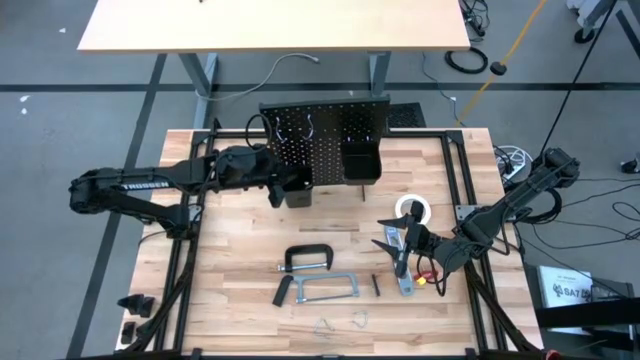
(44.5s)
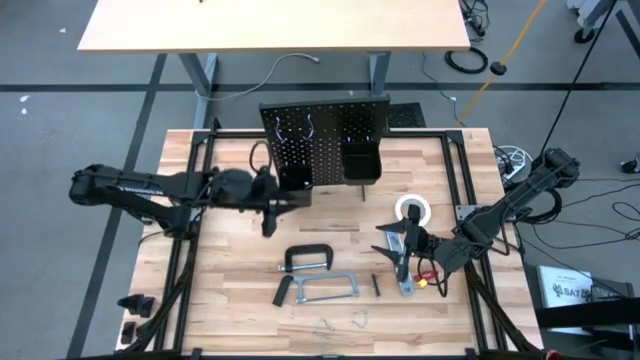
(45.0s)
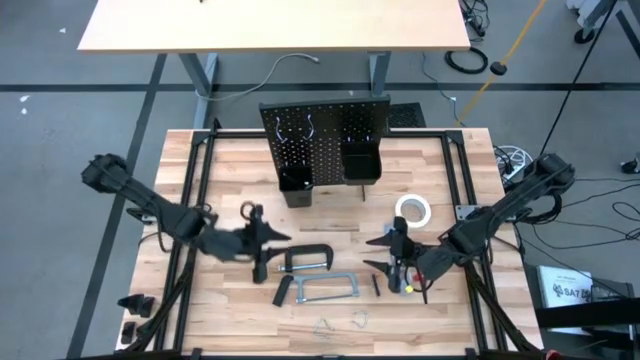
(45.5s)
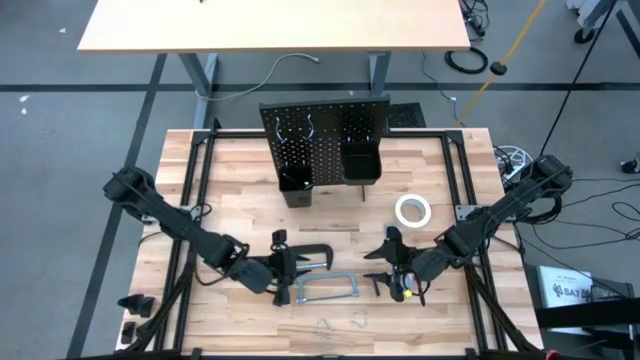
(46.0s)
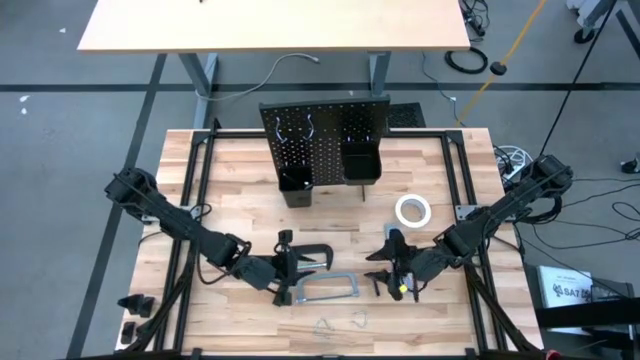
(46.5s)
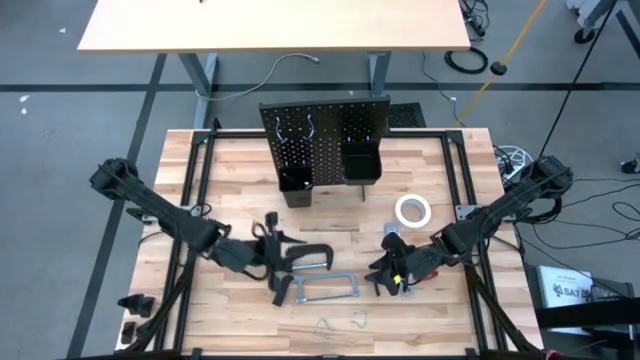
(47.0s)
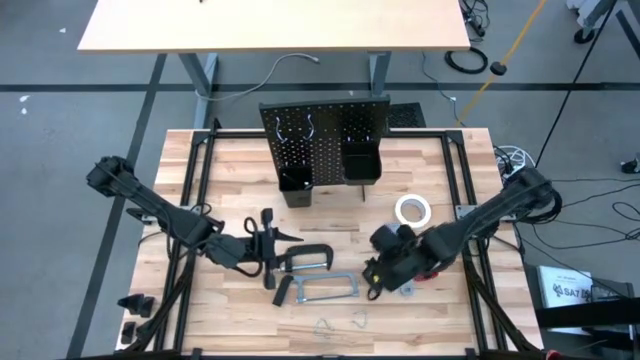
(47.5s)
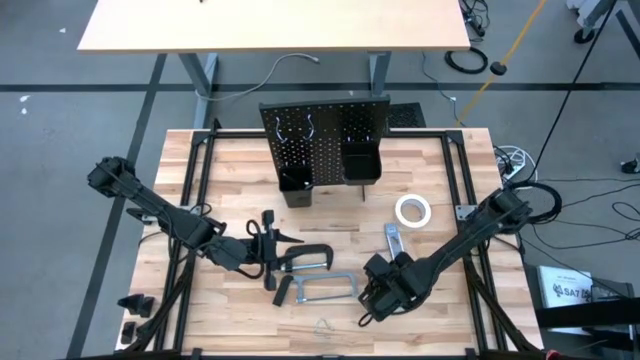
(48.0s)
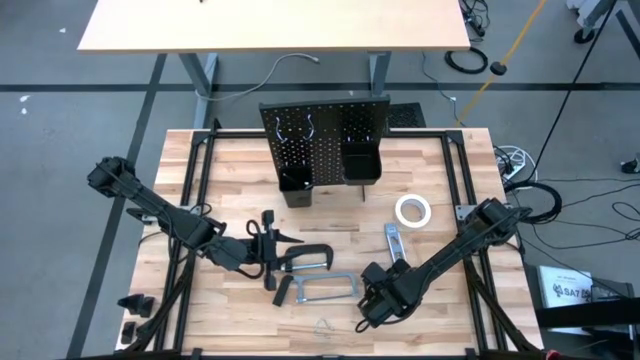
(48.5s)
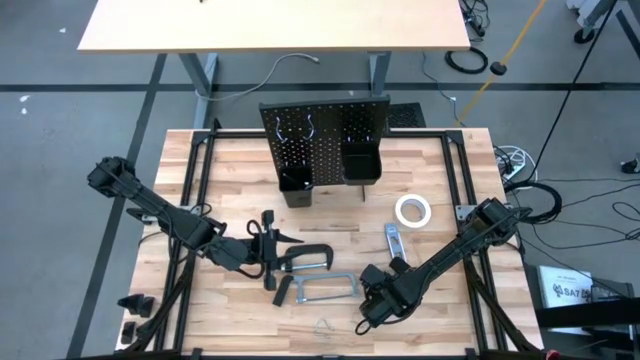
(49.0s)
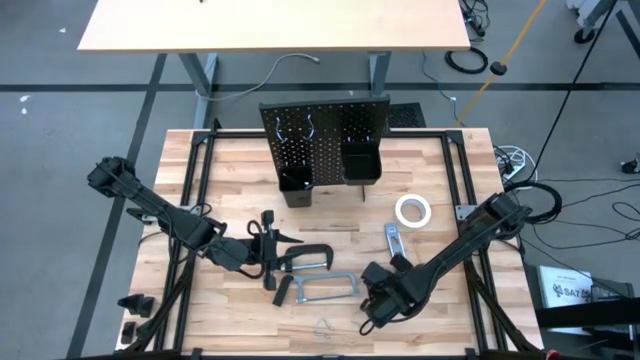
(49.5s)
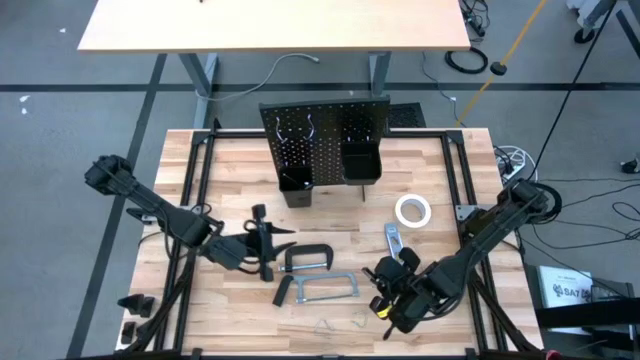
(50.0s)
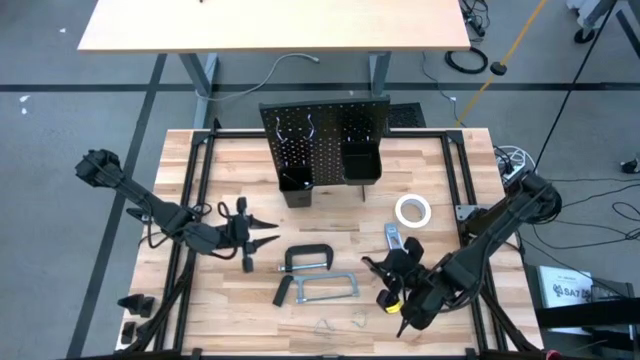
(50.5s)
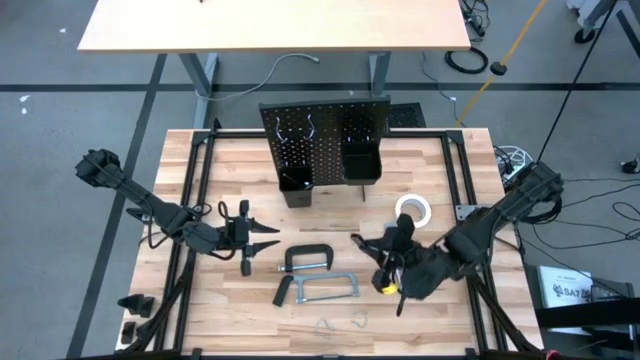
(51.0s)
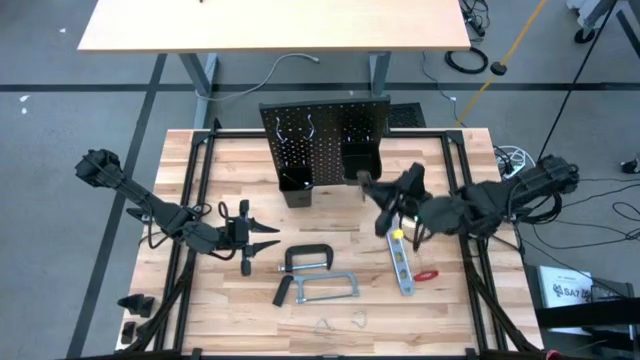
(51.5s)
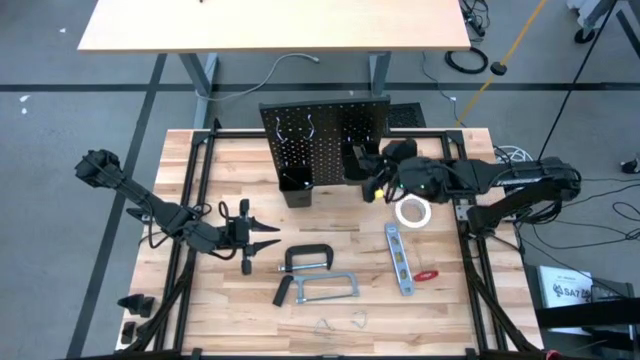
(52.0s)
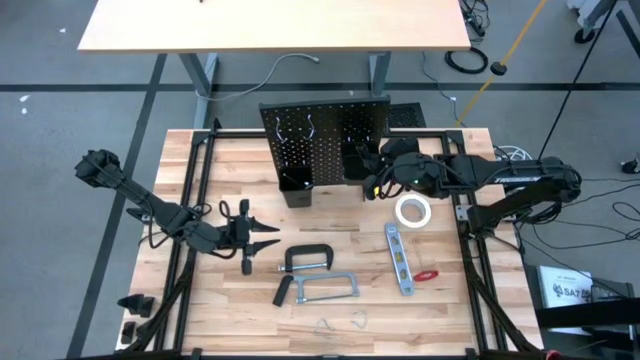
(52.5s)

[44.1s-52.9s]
Task: Hang tools onto peg board
Put the small transparent box into the top black bin on the peg board

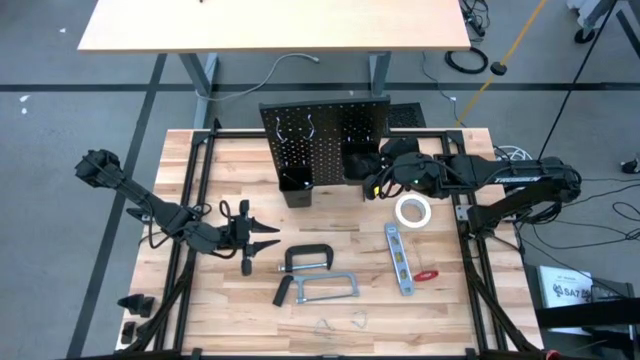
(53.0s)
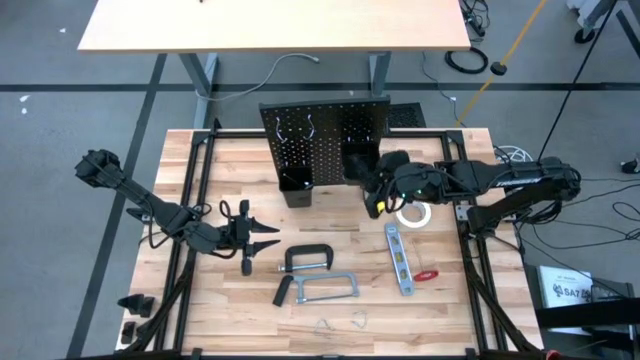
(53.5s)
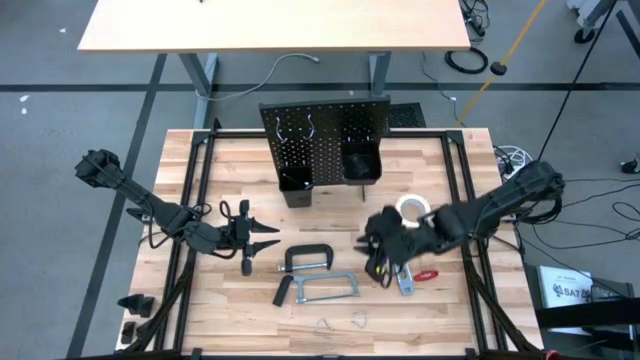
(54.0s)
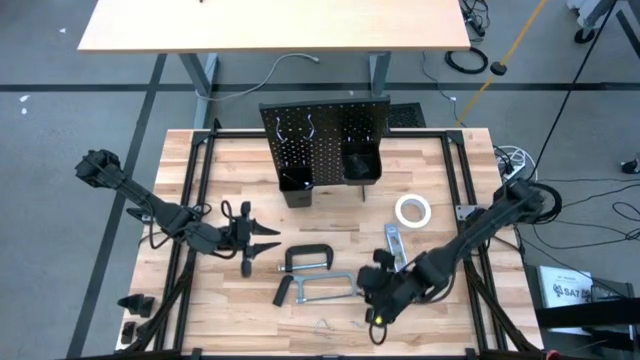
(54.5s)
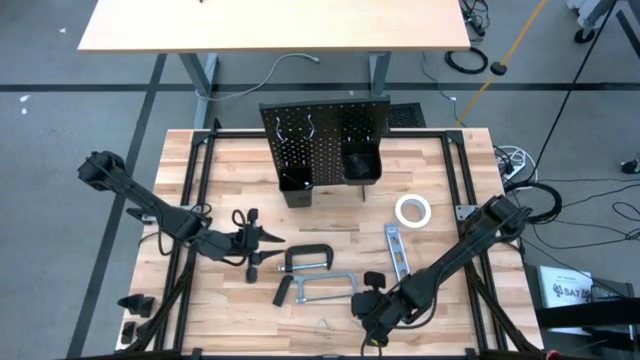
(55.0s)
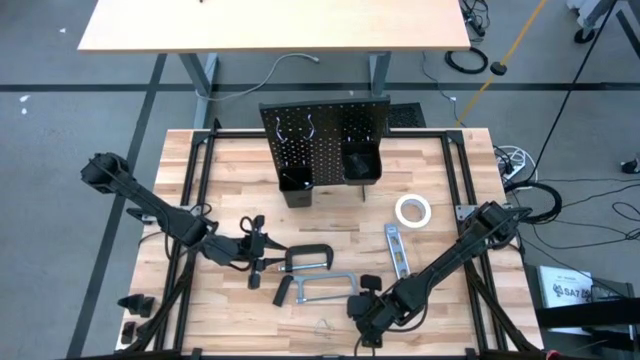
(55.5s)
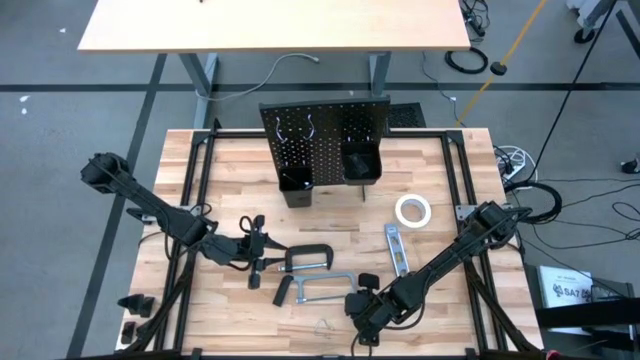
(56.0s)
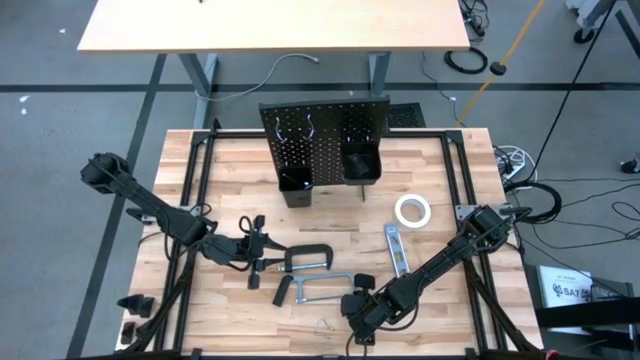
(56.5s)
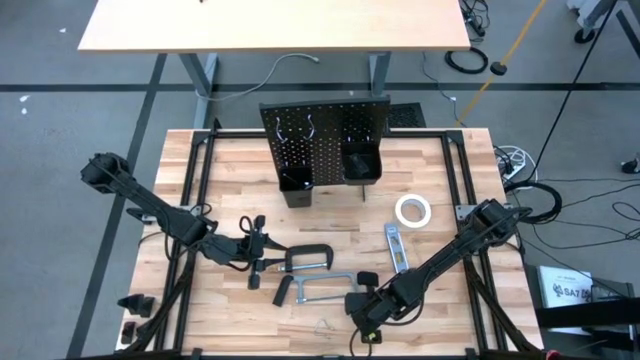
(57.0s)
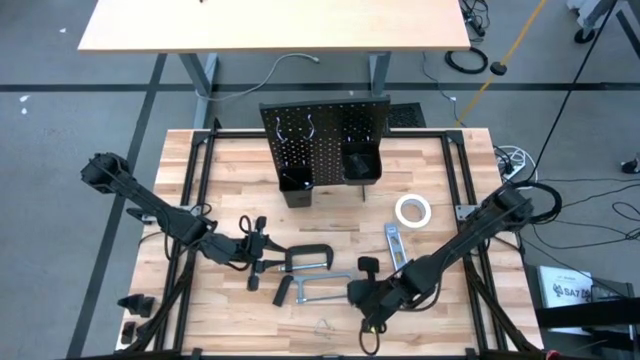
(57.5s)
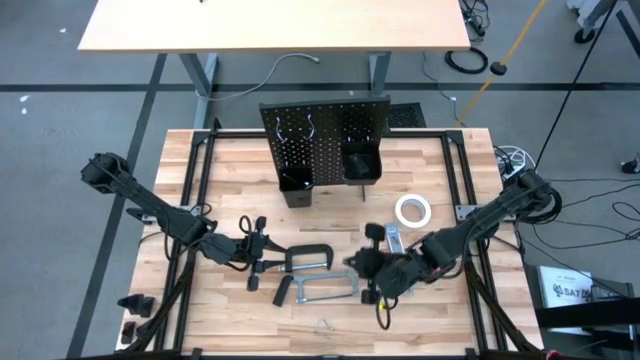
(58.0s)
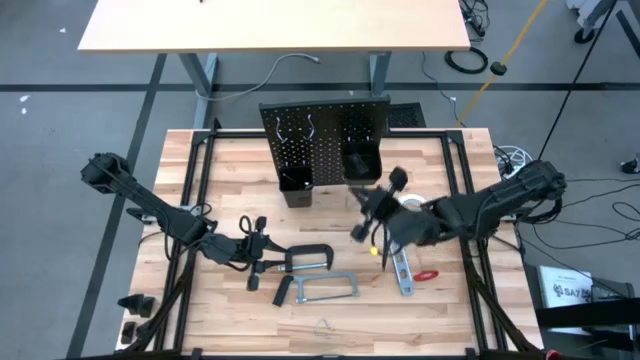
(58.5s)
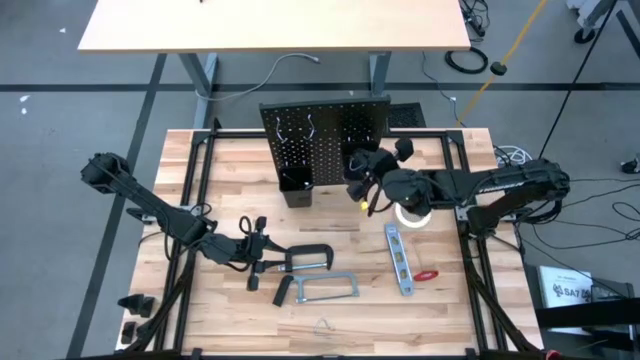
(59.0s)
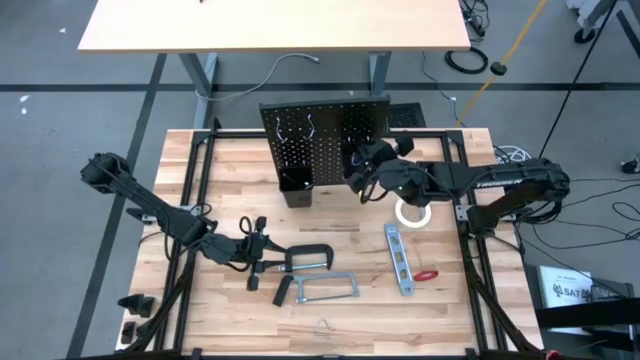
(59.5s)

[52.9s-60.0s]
Put the right binder clip into the top black bin on the peg board

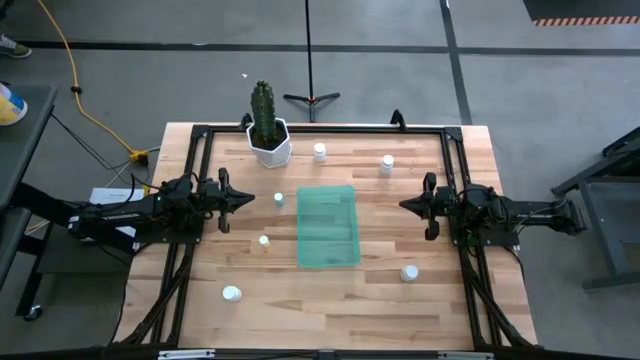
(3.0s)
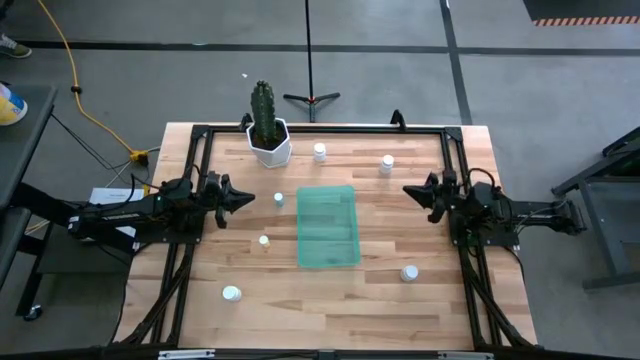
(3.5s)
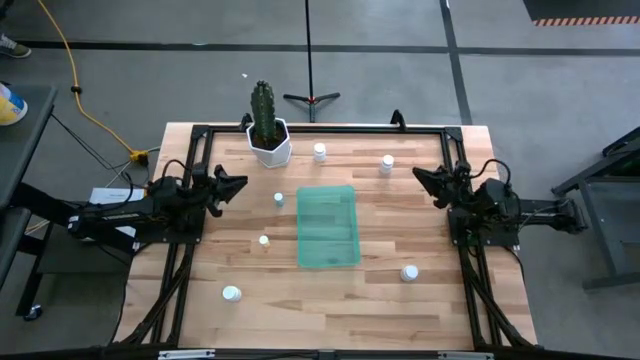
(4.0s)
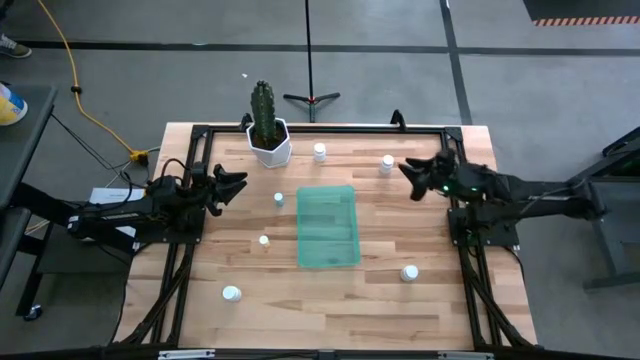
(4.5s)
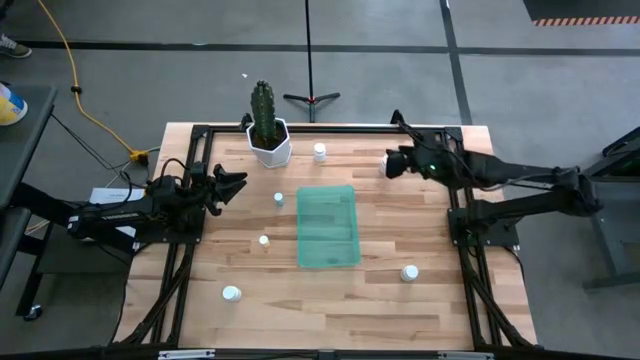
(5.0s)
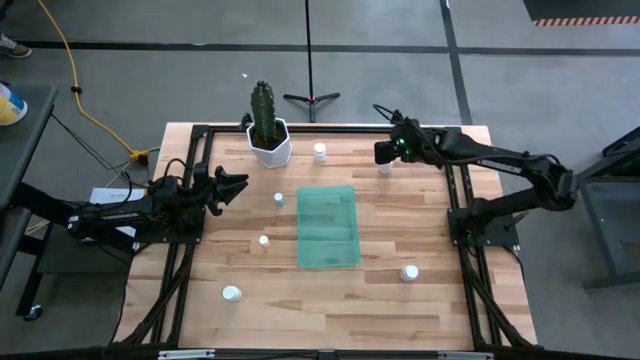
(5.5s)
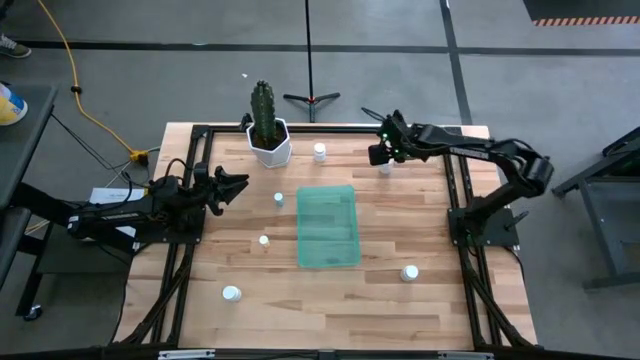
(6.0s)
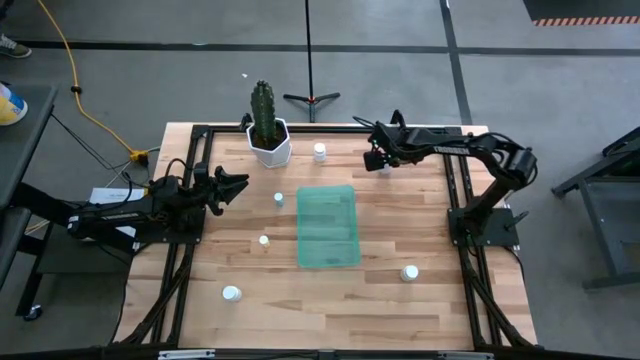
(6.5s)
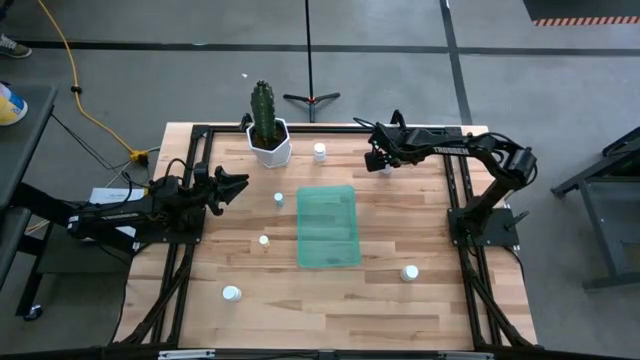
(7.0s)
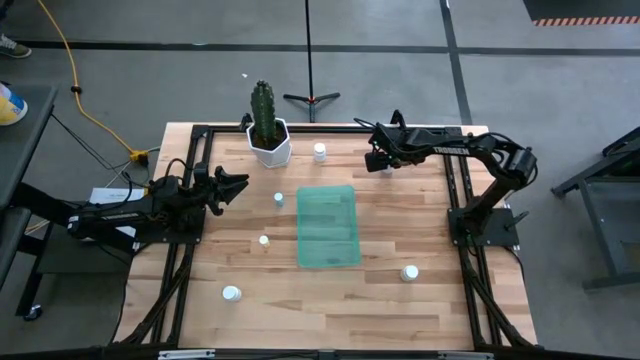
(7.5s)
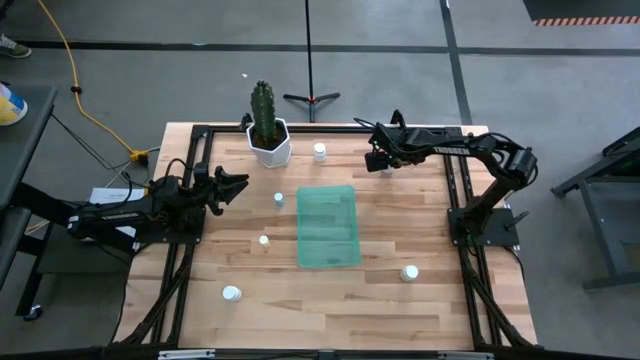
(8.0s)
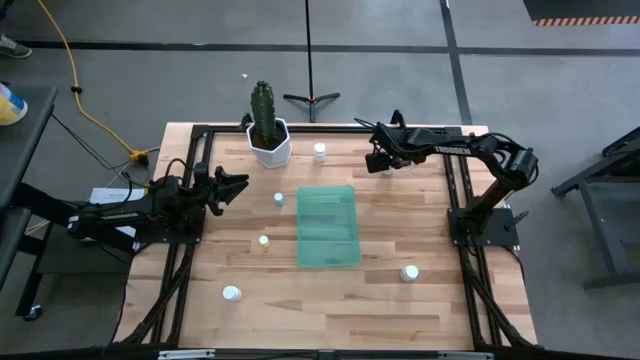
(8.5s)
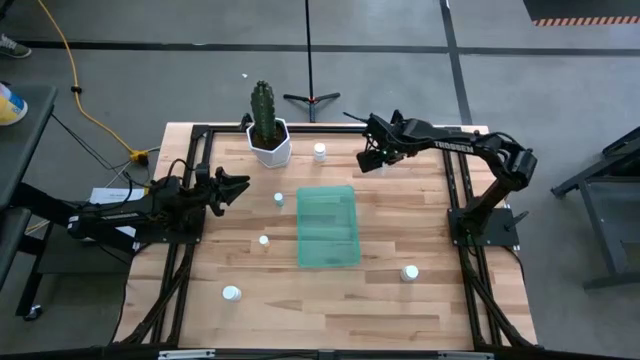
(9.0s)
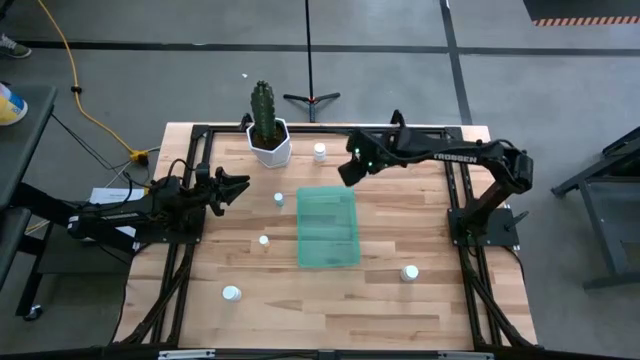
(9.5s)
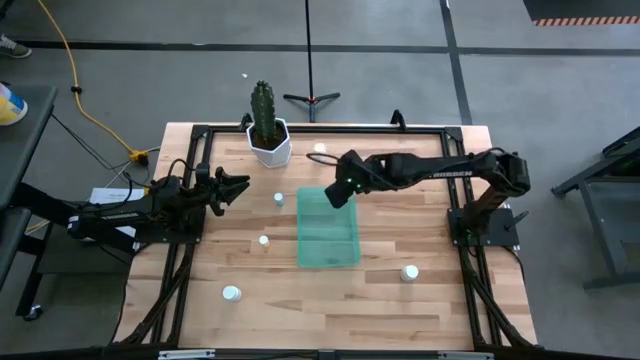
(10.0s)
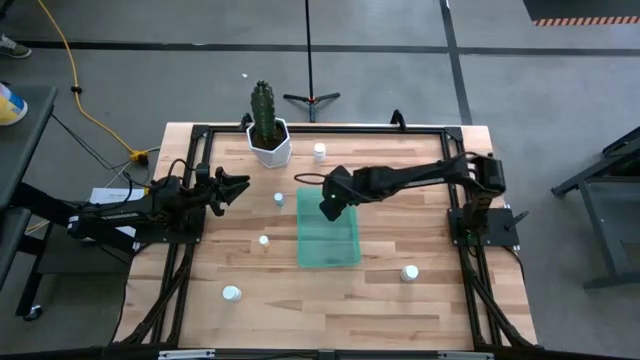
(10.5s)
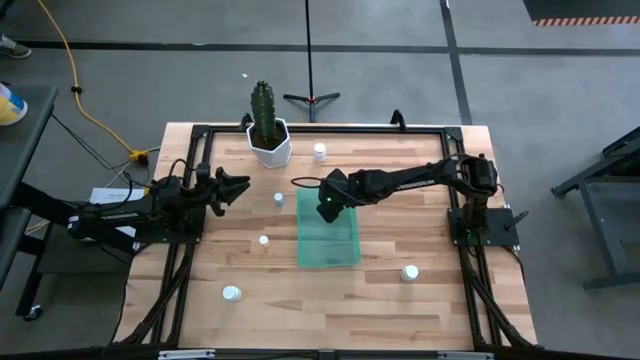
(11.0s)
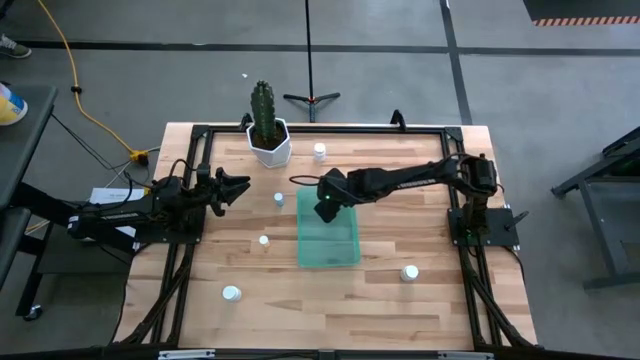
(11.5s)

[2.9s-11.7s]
Task: Pick and place pill bottles into a basket
Put the white pill bottle into the green bin
